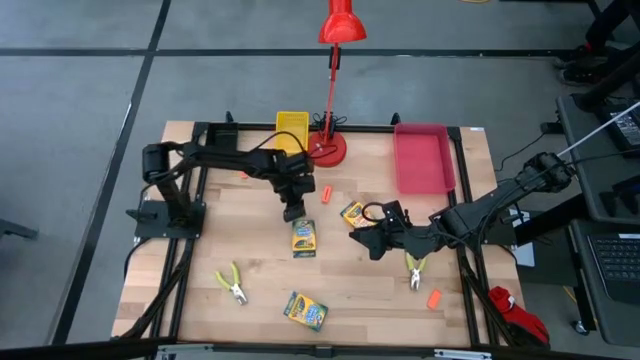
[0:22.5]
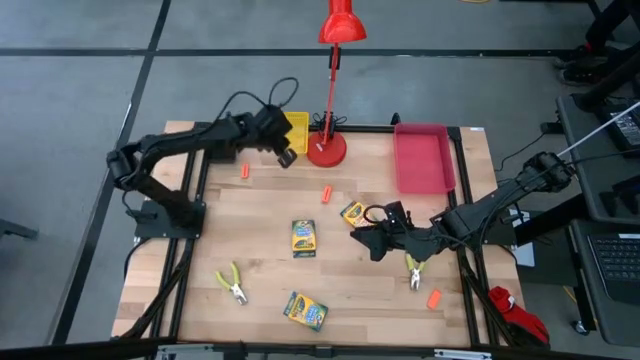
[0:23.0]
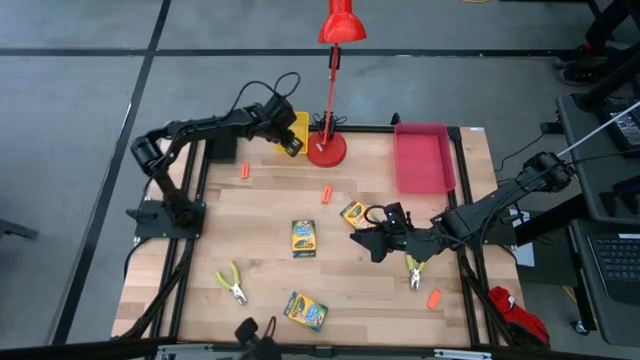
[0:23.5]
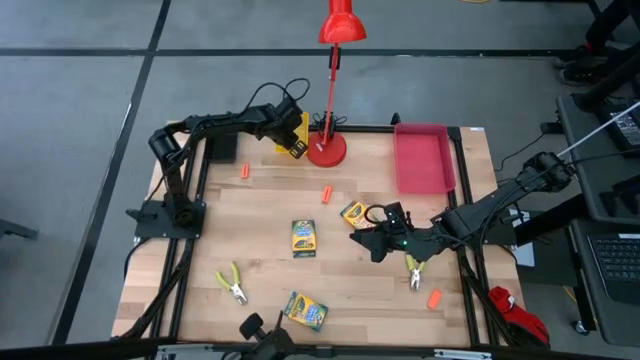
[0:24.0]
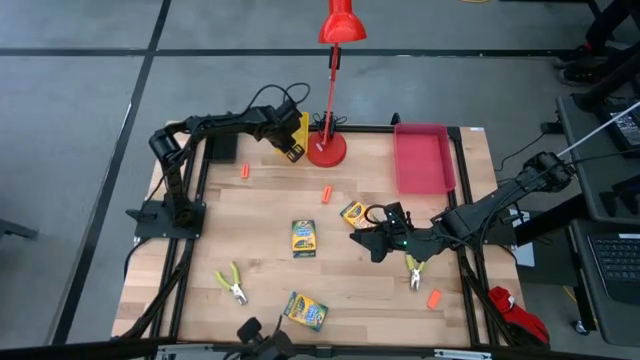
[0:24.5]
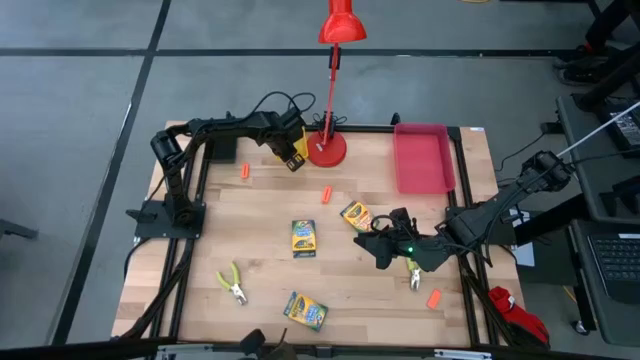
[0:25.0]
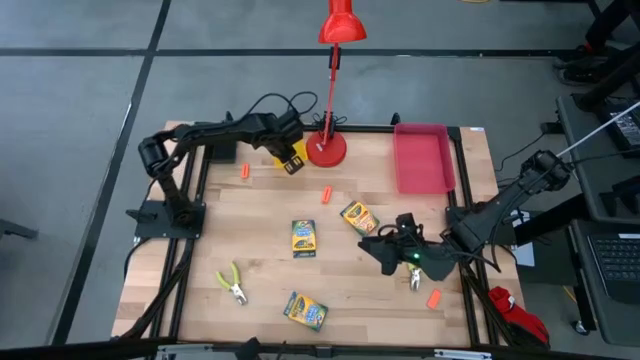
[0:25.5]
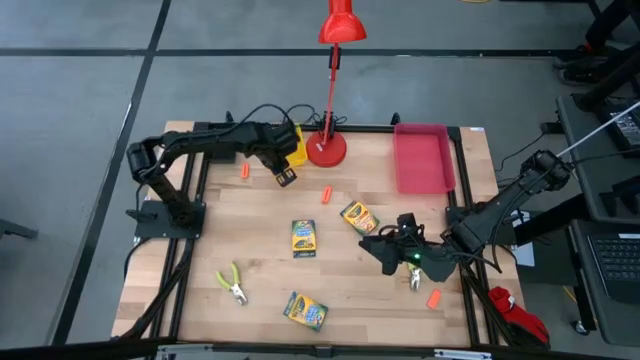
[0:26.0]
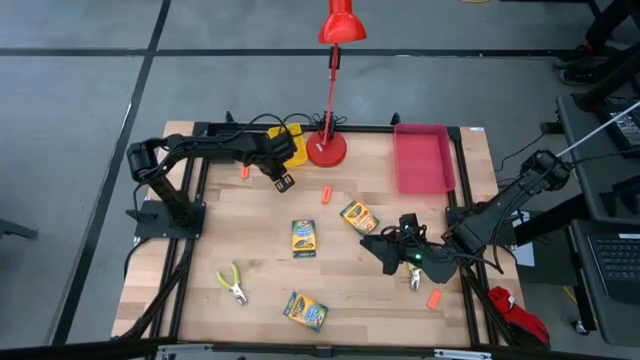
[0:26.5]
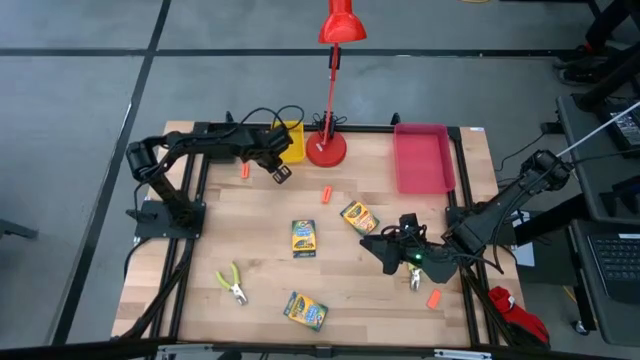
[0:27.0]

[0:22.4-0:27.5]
Task: Pick & Place School Supplies
Adjust the yellow bin

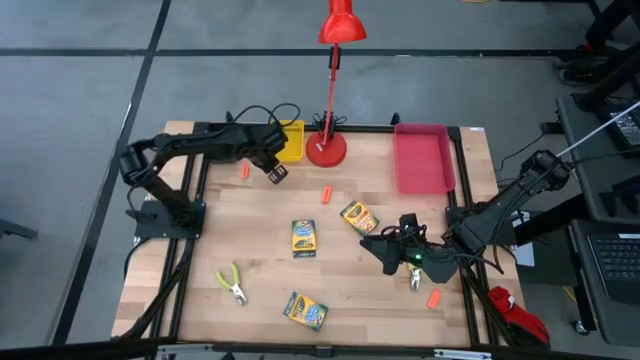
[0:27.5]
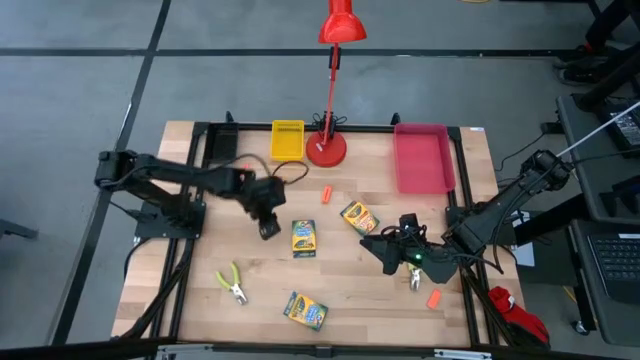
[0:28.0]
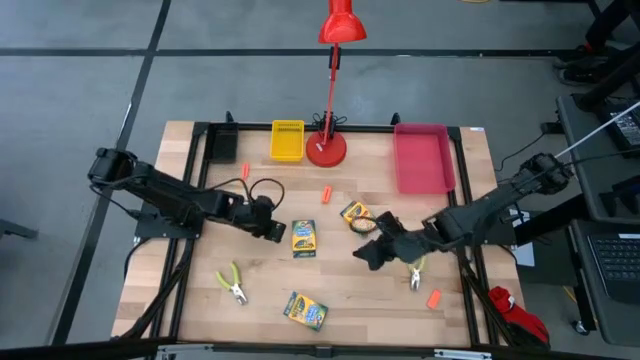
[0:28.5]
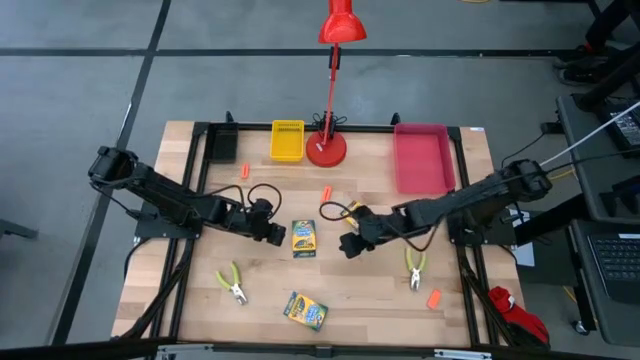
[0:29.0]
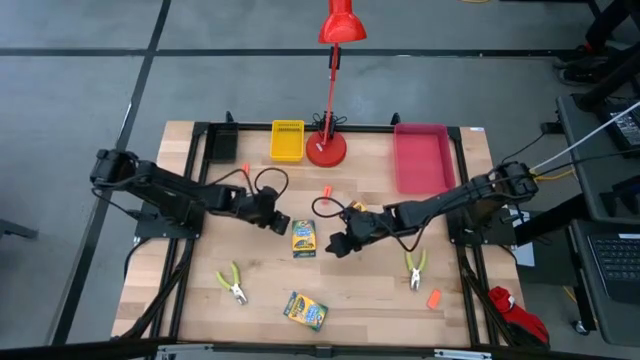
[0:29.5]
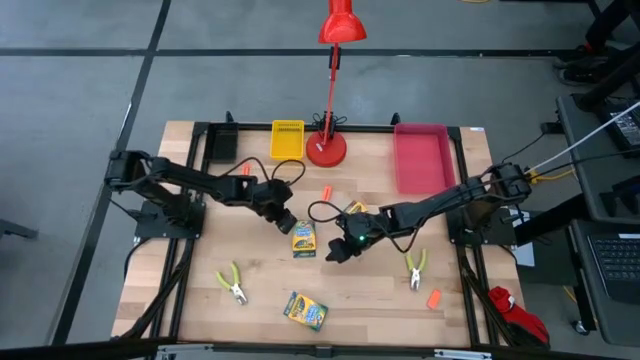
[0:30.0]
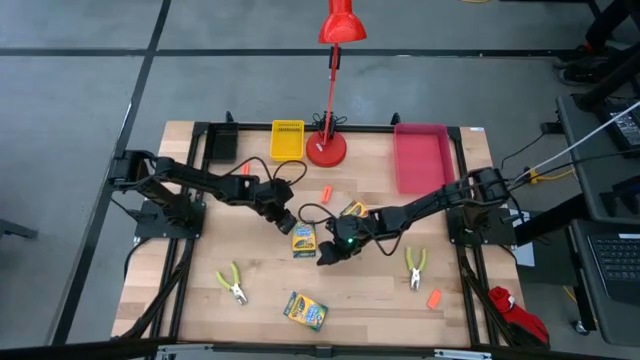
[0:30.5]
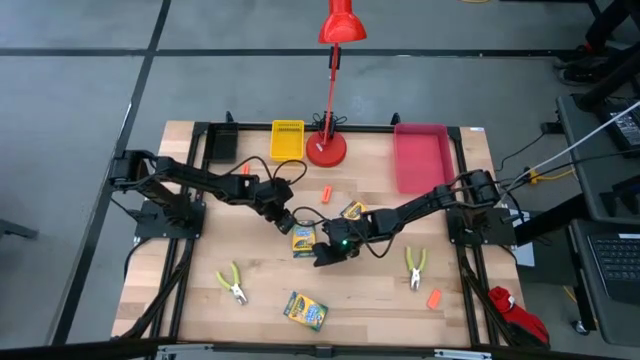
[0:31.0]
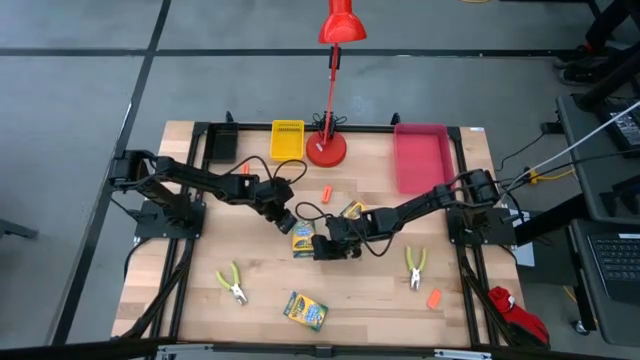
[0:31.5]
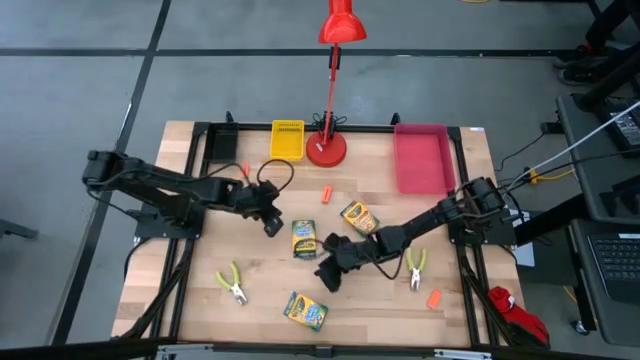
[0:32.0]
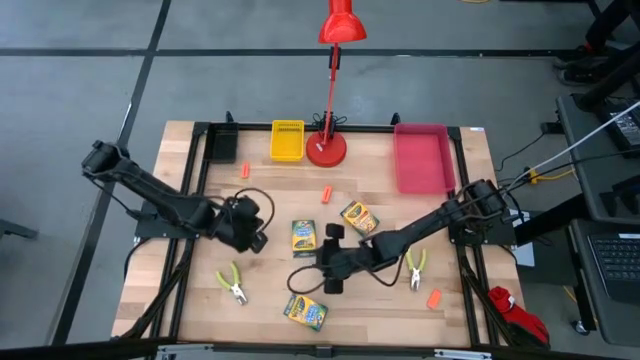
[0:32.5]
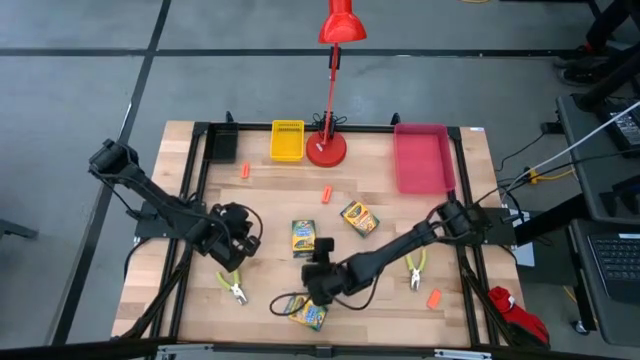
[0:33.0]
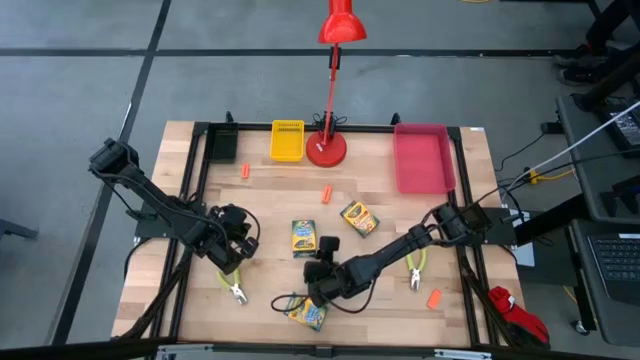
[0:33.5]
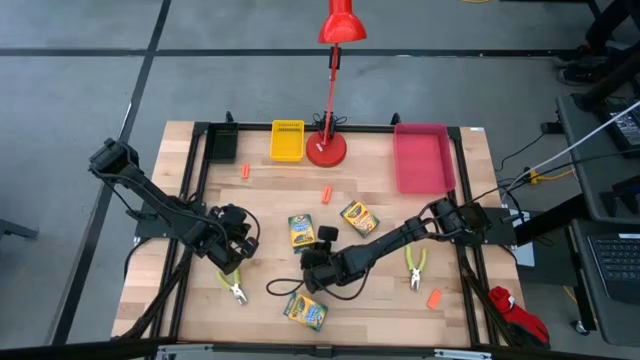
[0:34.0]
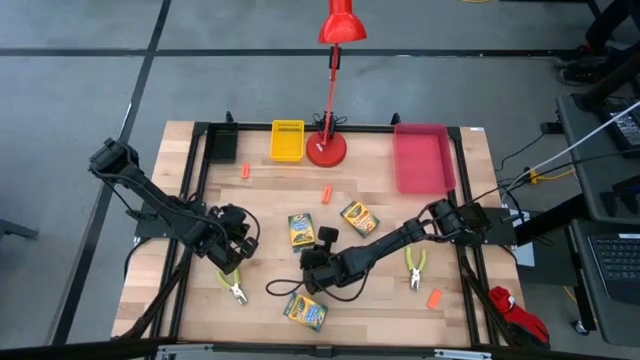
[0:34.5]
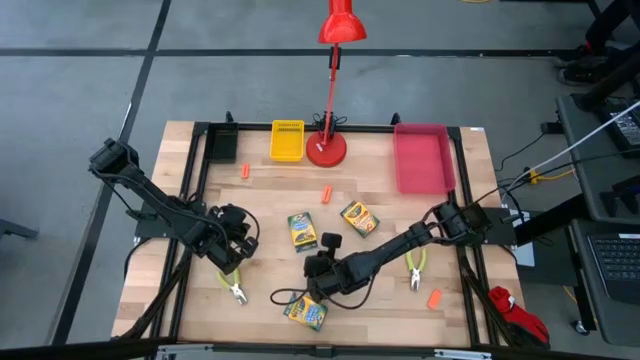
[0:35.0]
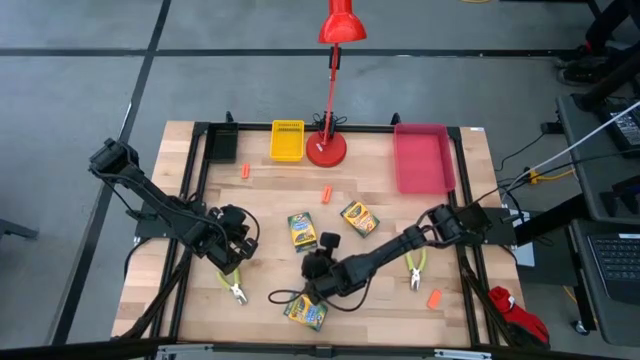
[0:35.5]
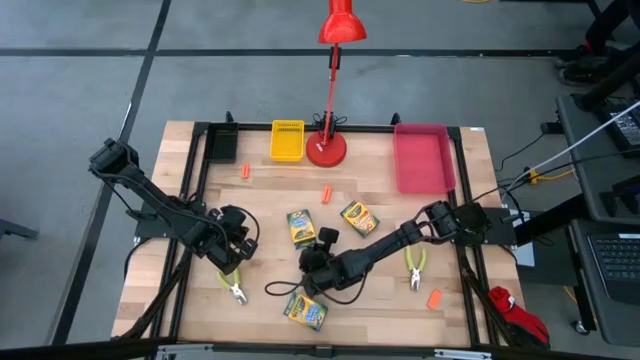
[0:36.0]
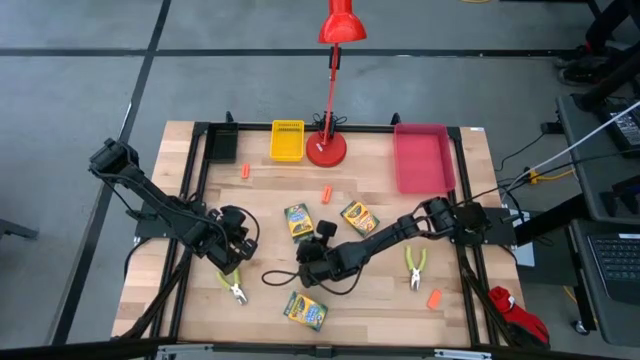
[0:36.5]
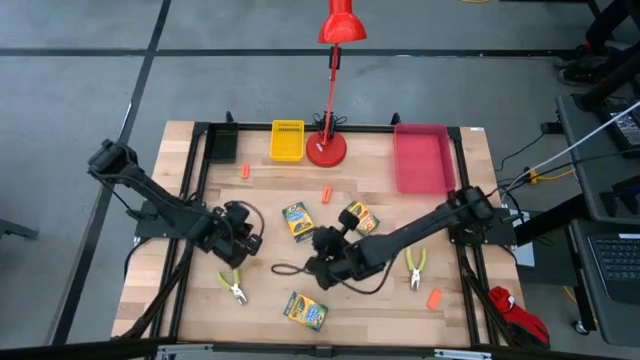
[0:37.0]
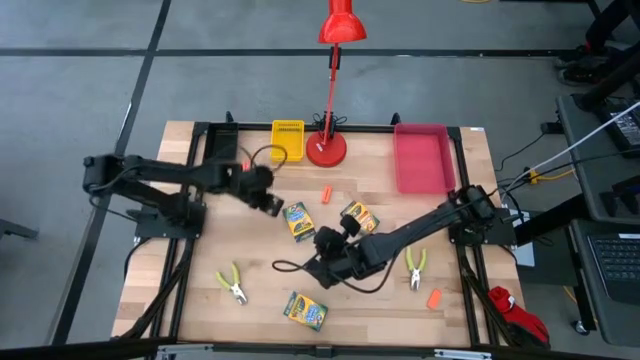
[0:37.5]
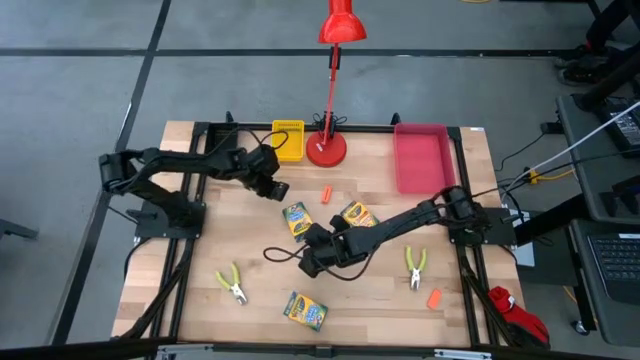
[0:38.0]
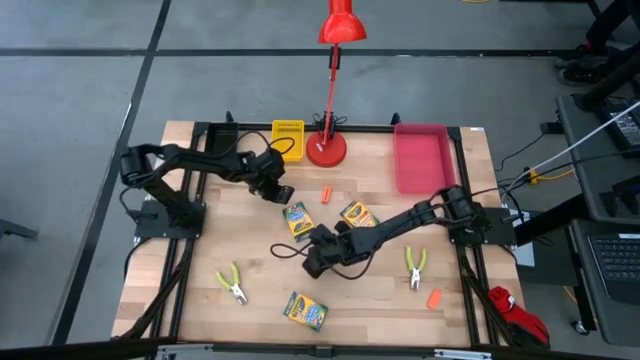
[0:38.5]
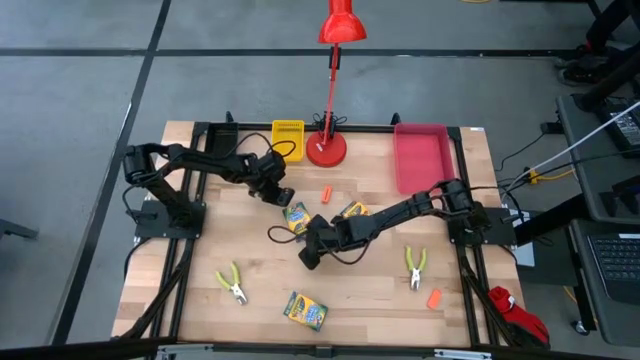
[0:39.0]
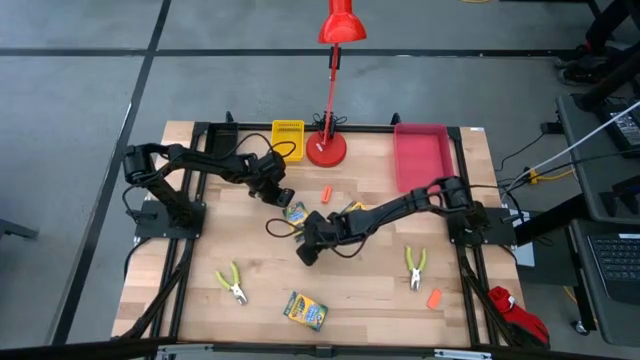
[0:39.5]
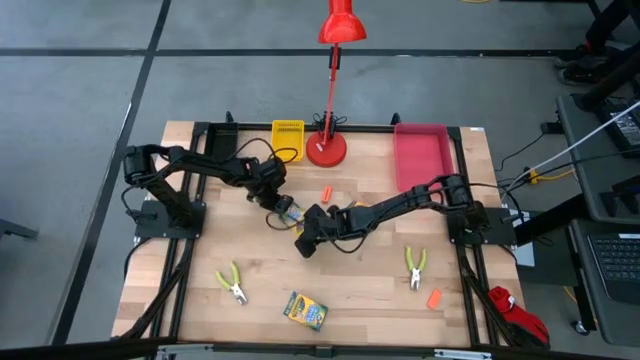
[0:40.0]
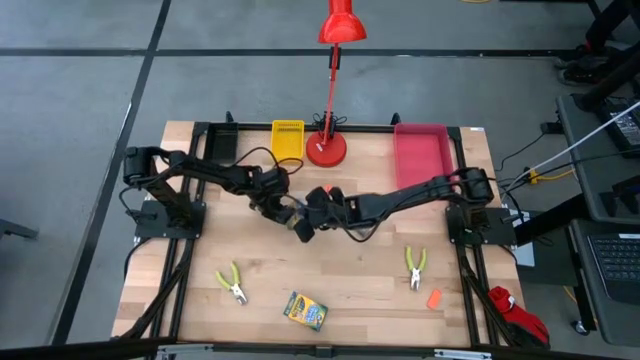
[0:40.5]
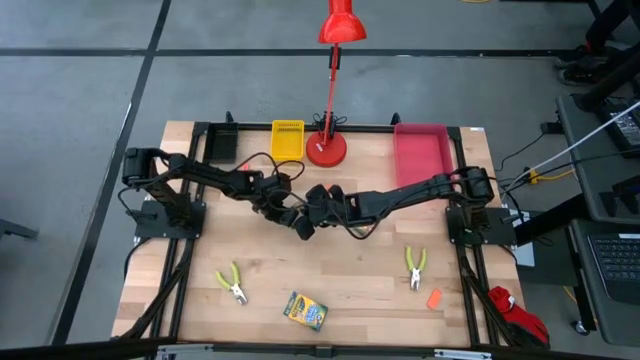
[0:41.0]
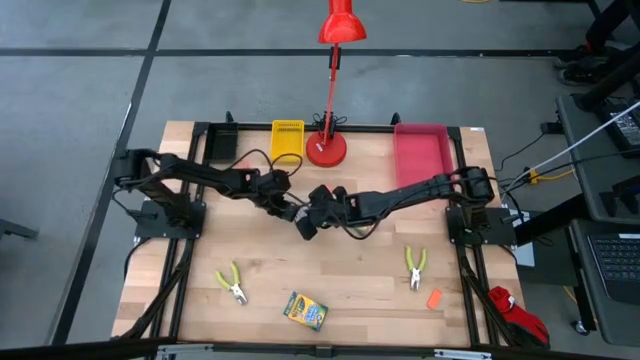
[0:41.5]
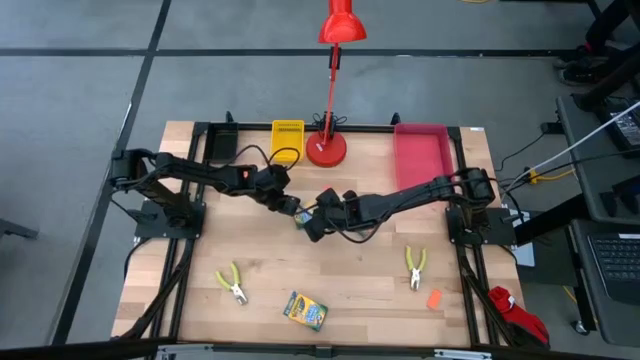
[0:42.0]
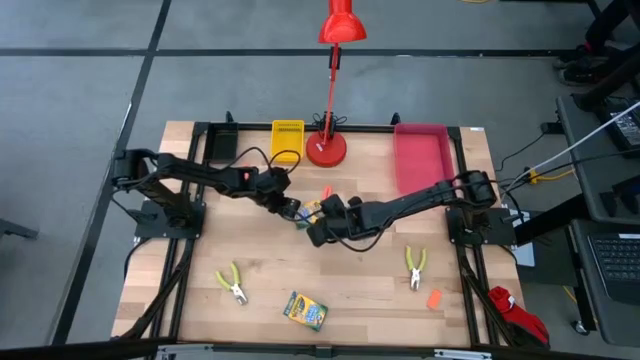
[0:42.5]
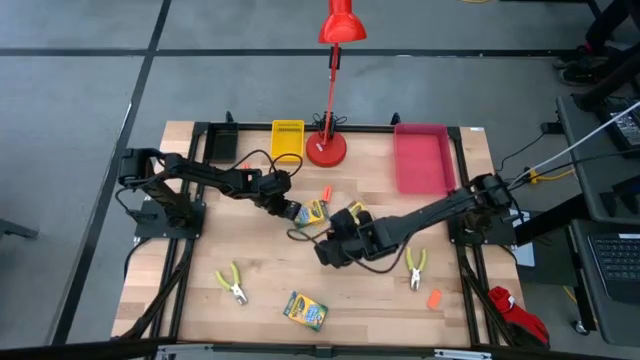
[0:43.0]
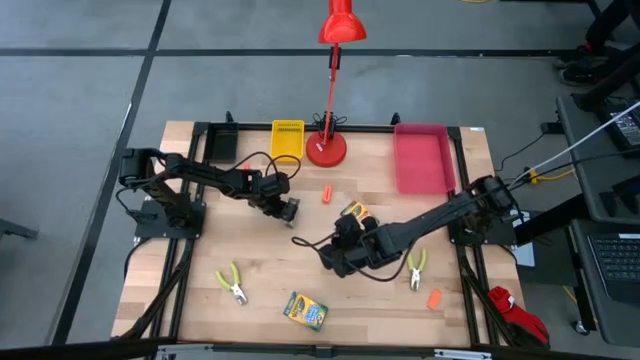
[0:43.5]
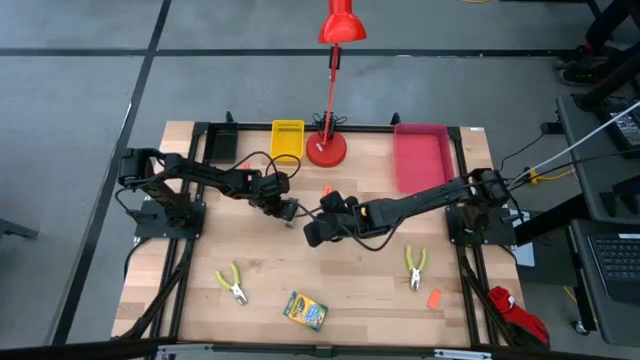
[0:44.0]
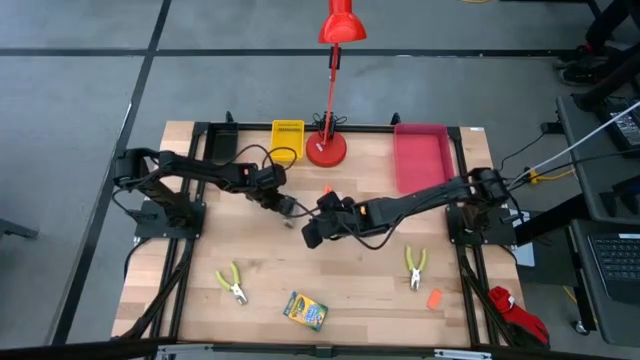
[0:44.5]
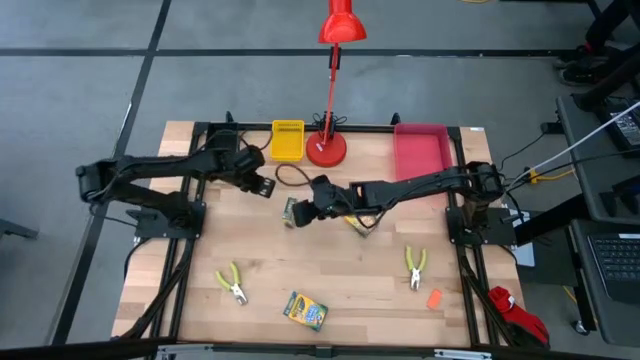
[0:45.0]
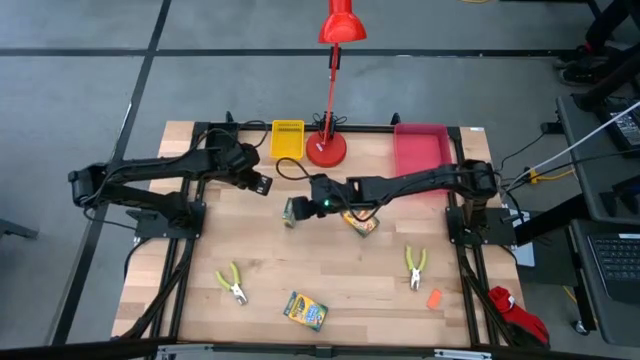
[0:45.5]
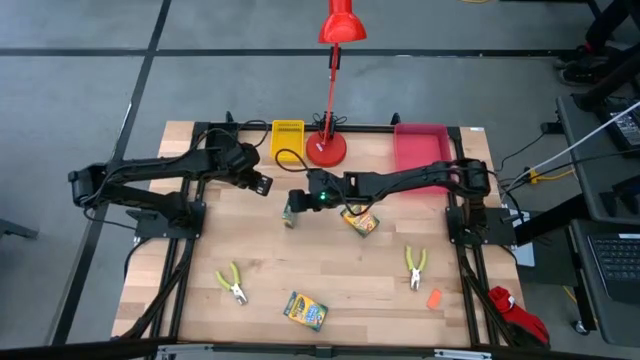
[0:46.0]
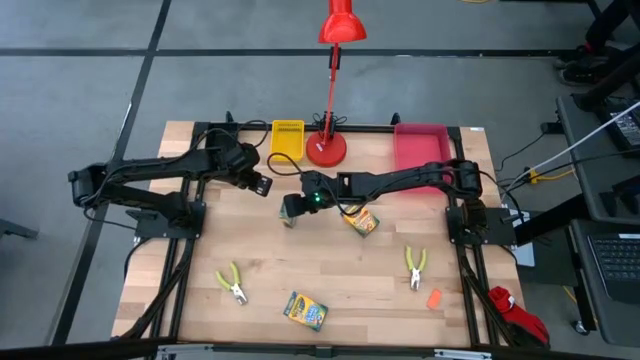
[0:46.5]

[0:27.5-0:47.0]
Put the yellow crayon box into the red bin
